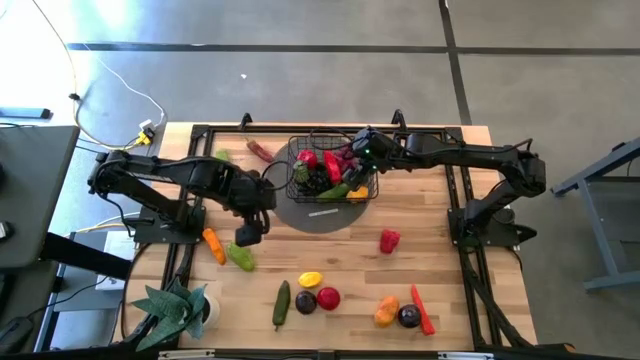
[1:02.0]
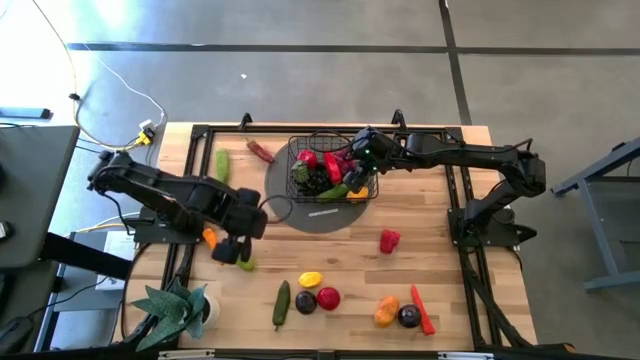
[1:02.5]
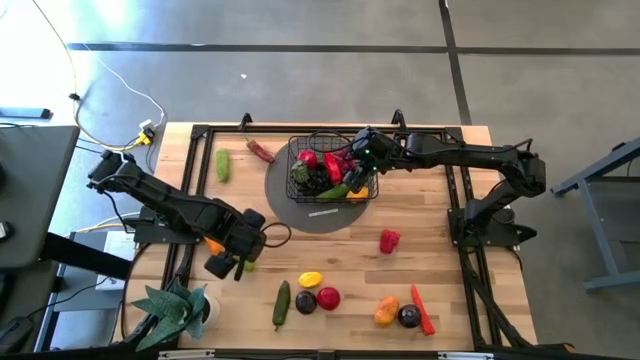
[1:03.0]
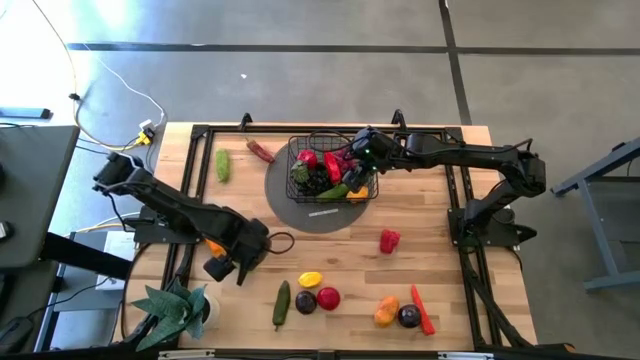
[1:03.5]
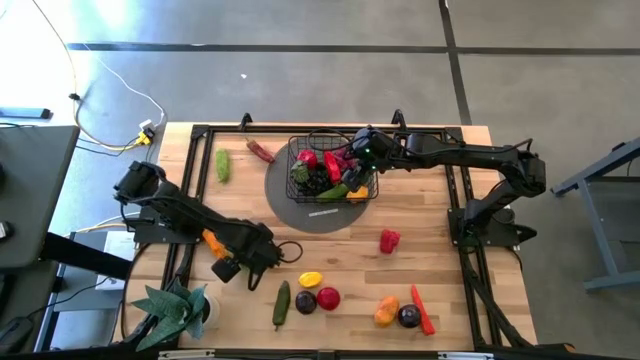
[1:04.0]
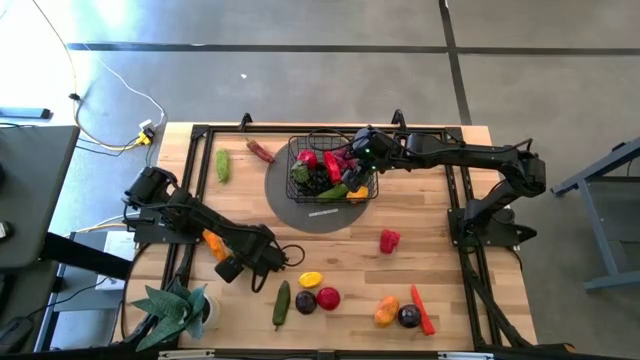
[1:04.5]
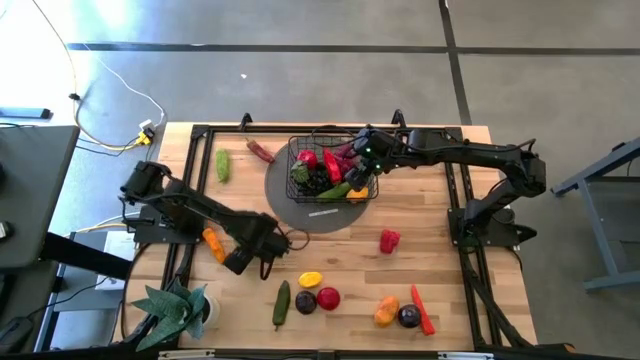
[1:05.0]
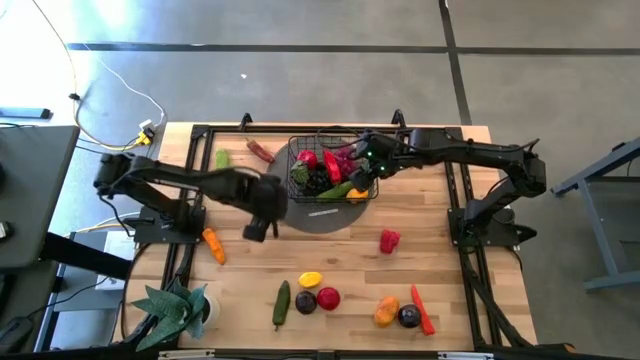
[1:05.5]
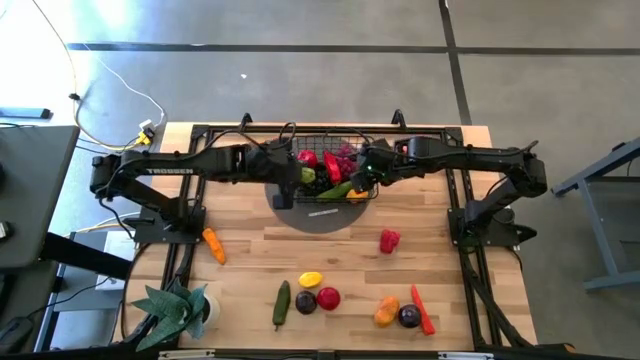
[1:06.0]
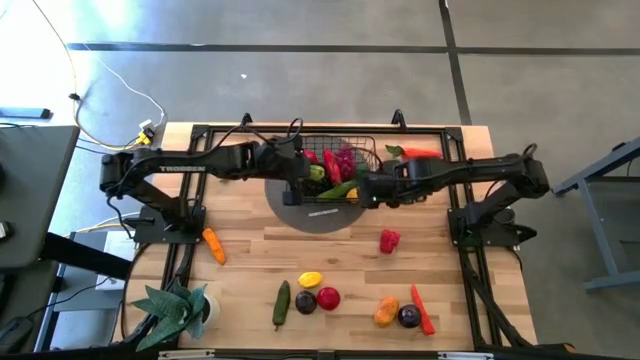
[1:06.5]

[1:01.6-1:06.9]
Task: Build produce basket
Put the green chayote into the black mesh basket

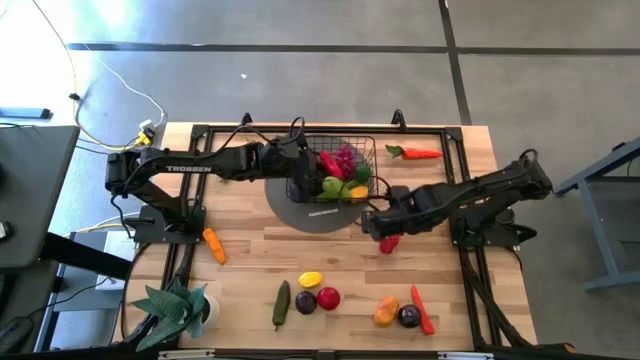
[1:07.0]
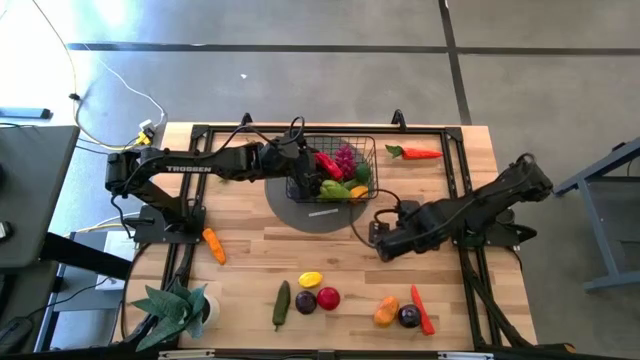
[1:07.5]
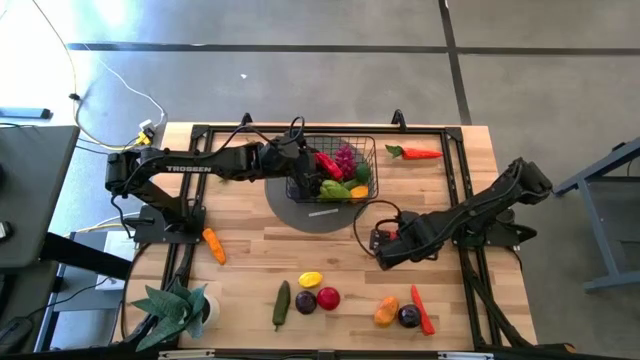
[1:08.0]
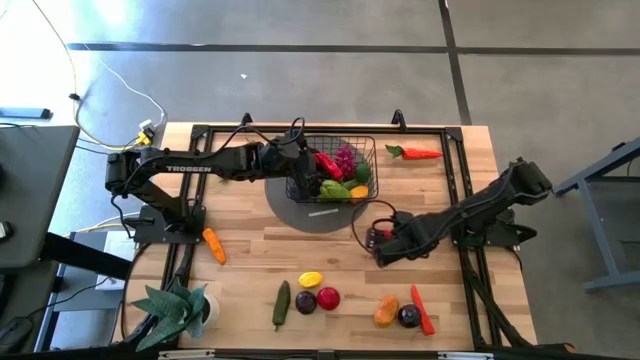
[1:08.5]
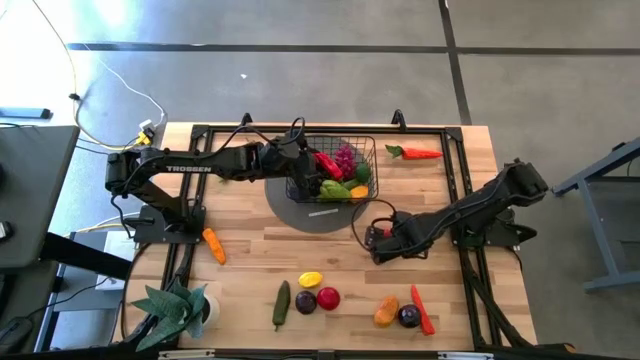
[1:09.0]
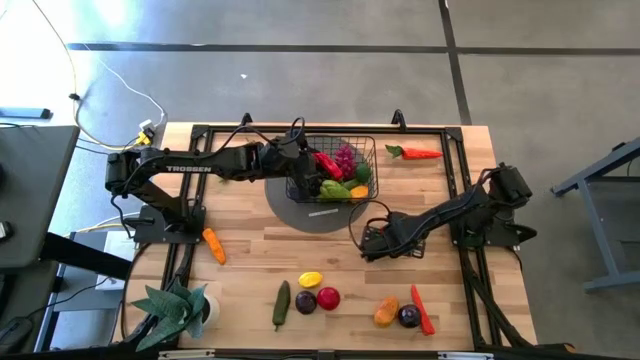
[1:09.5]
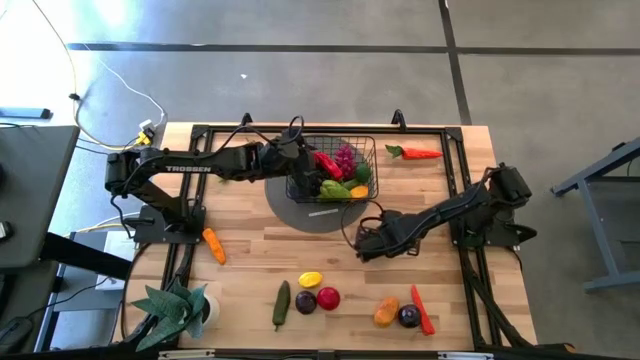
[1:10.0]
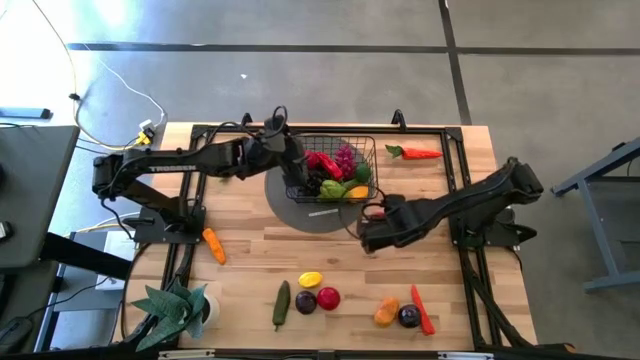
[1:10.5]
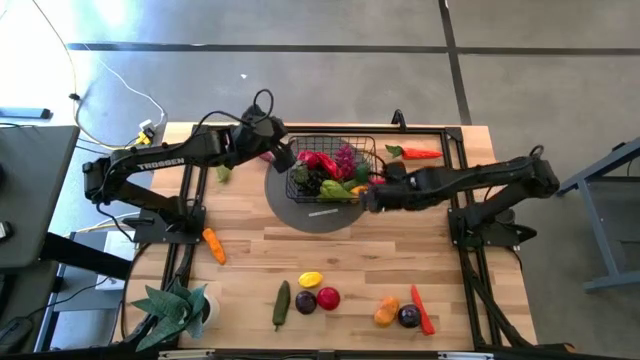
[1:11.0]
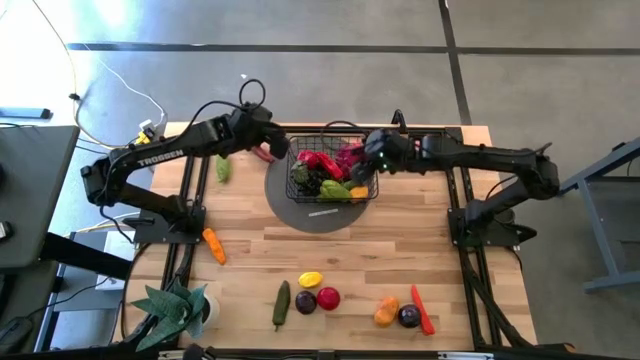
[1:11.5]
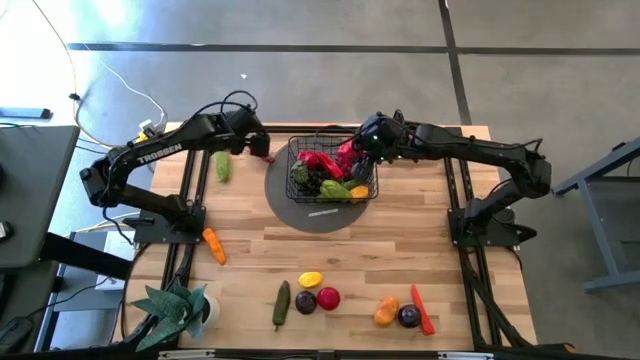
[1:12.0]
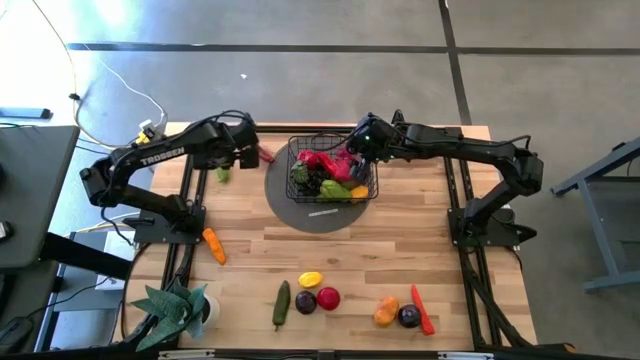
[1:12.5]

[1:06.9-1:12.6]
Put the red bell pepper into the black mesh basket

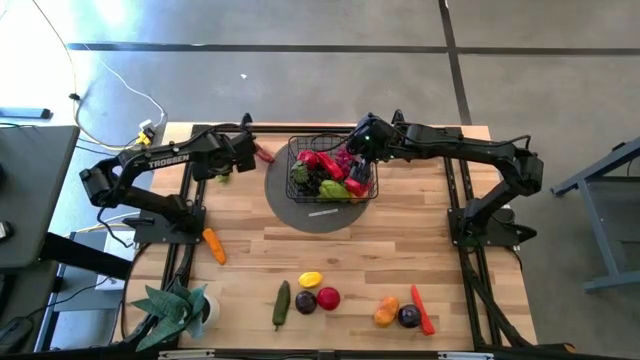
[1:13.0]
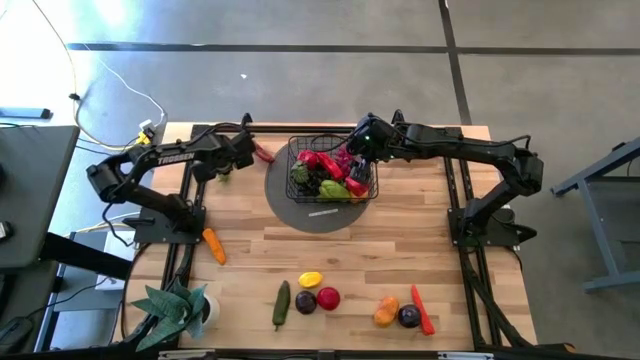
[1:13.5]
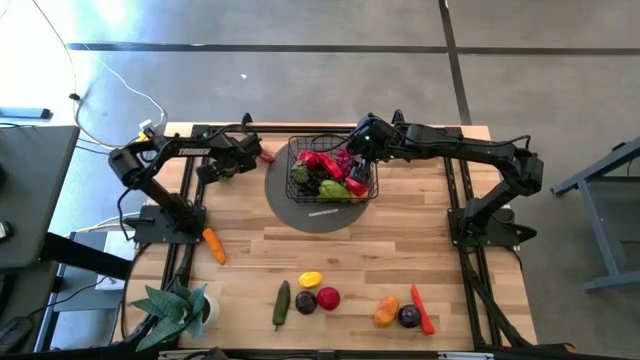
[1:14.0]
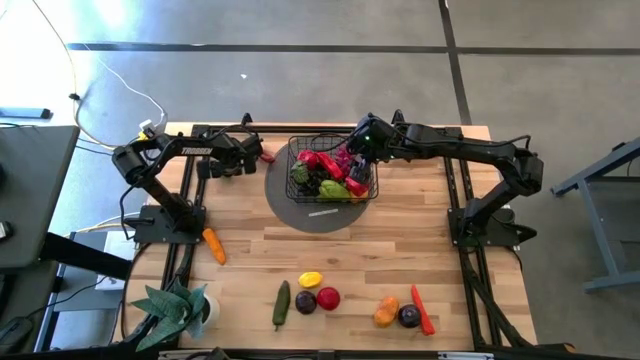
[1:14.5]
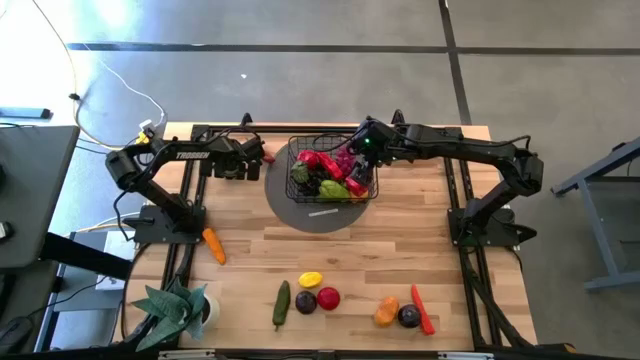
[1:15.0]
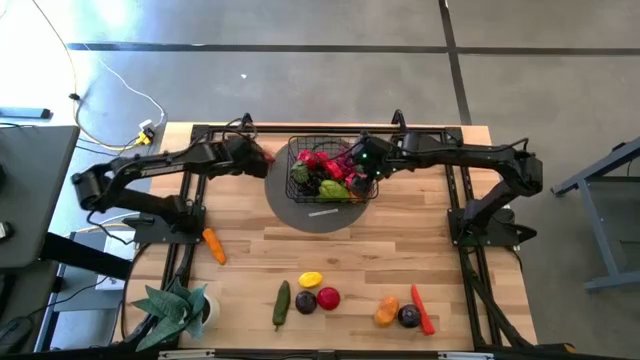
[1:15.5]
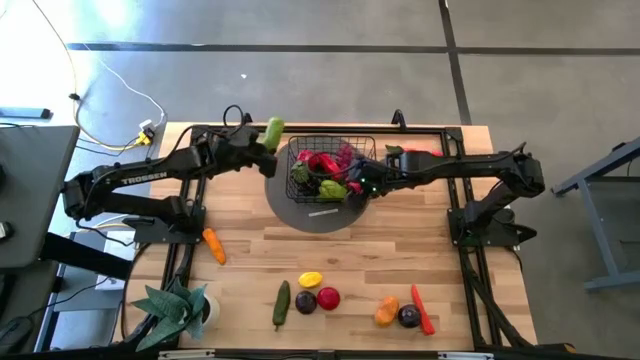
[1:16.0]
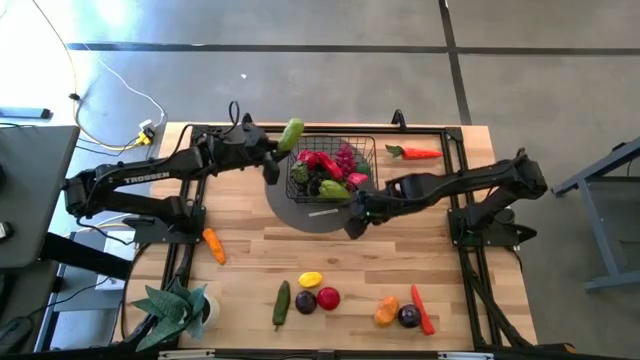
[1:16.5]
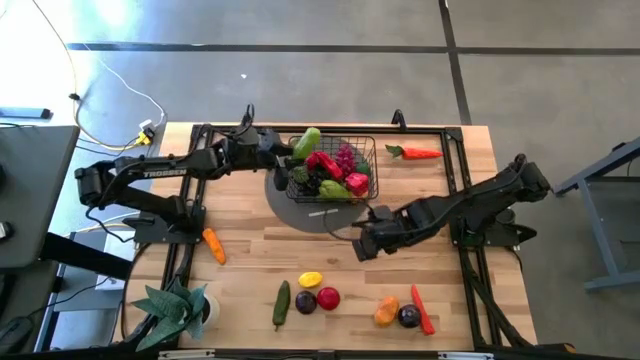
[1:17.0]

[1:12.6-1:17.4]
Put the green cucumber into the black mesh basket

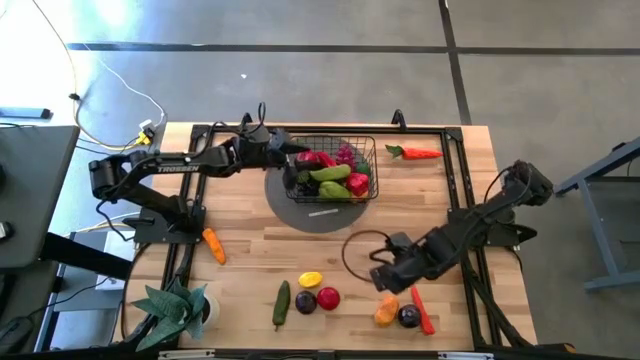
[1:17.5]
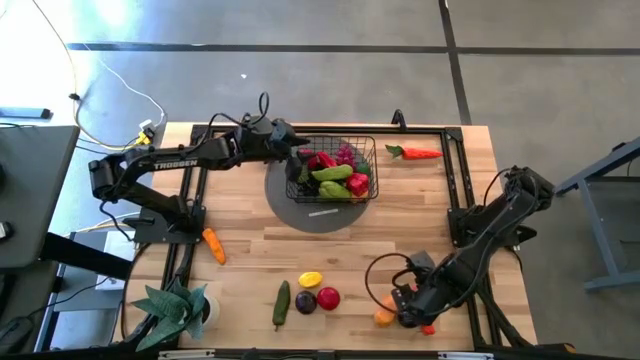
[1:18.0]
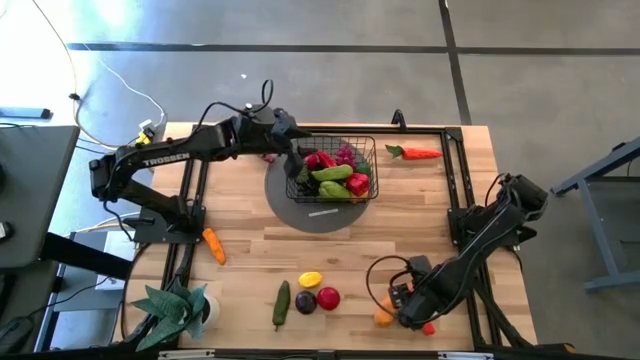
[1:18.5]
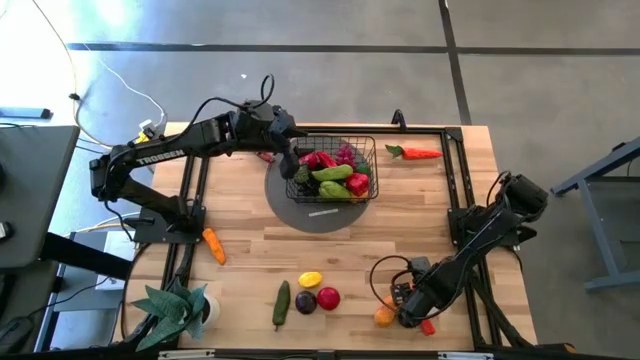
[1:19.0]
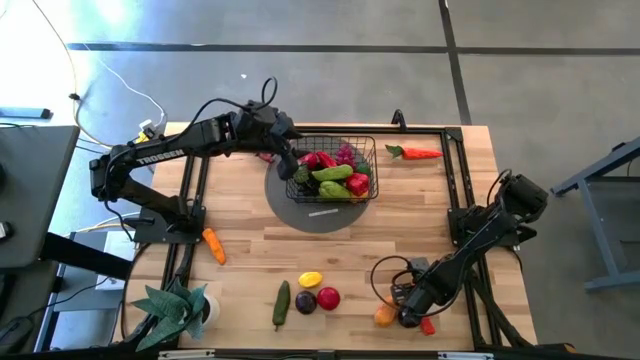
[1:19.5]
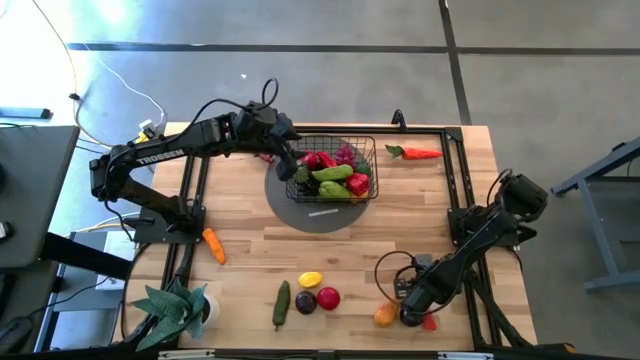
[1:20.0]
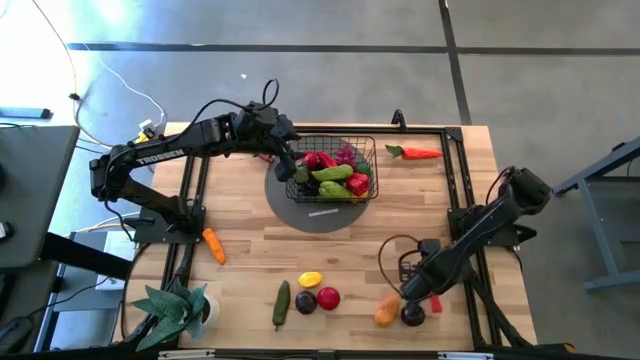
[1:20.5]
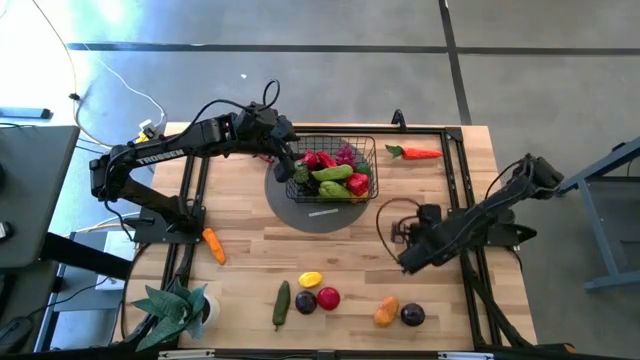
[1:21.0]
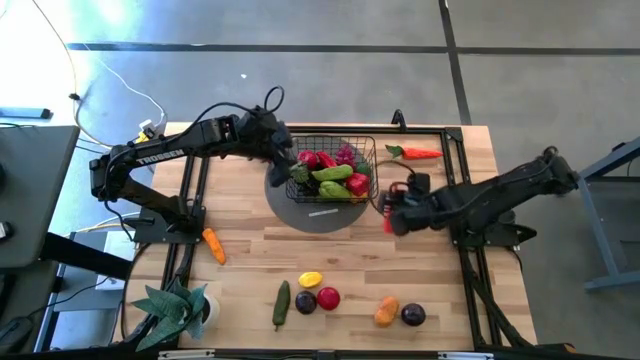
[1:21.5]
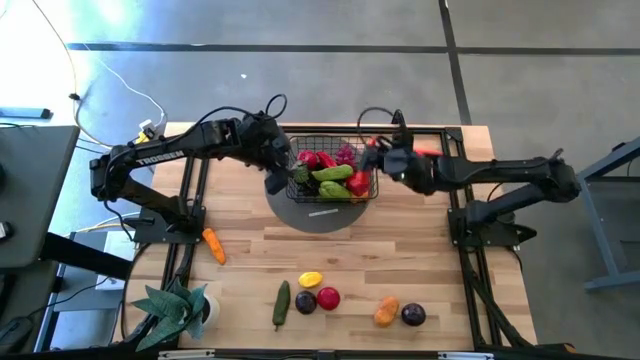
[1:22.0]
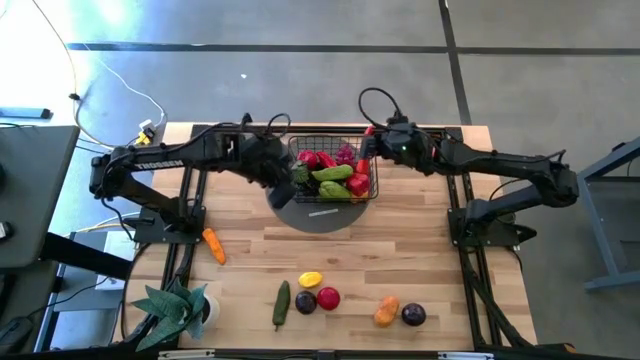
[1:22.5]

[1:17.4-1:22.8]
Put the bottom orange carrot into the black mesh basket
